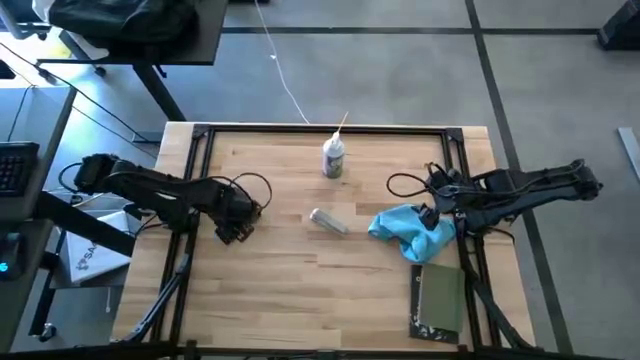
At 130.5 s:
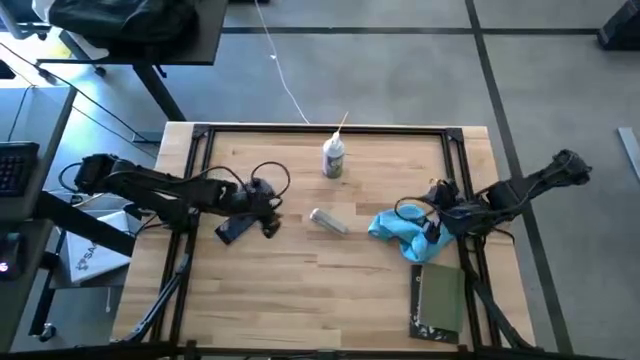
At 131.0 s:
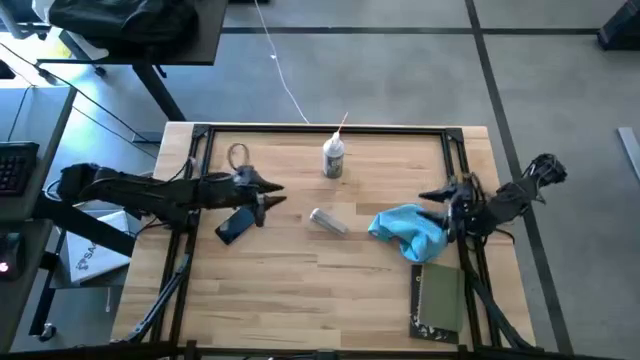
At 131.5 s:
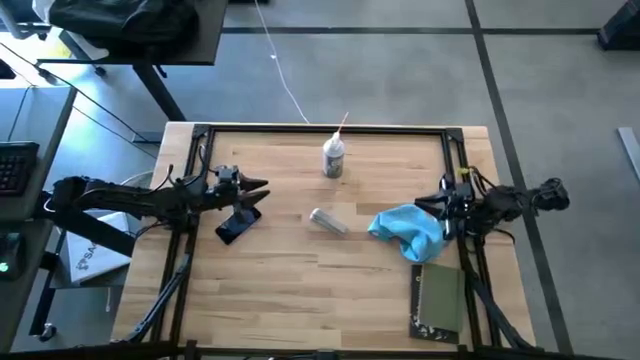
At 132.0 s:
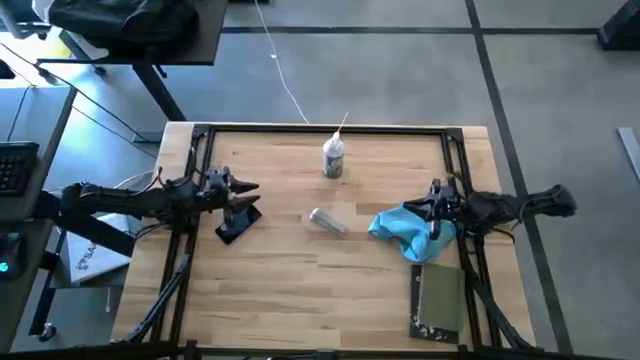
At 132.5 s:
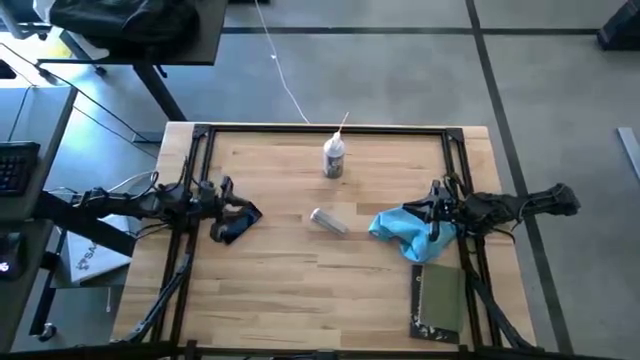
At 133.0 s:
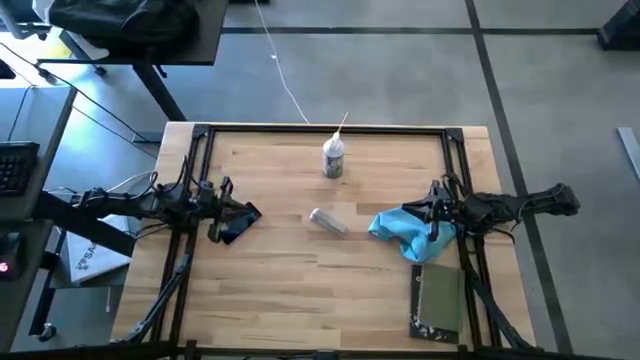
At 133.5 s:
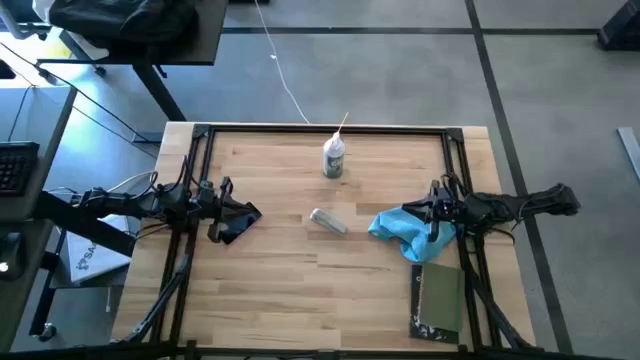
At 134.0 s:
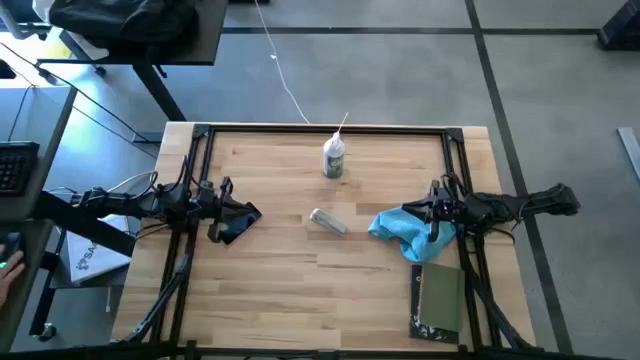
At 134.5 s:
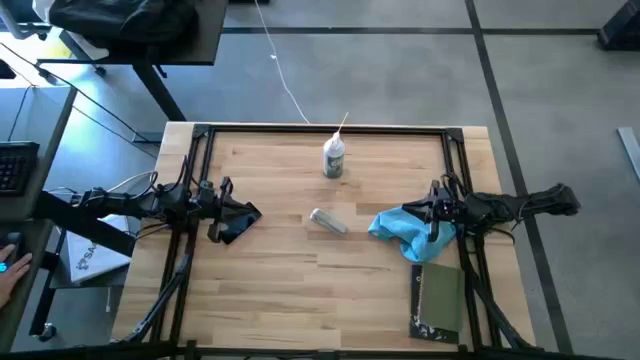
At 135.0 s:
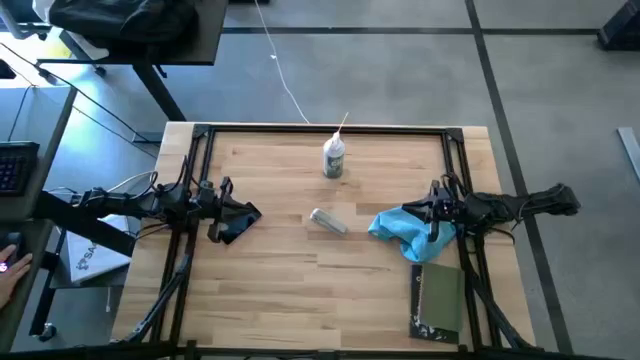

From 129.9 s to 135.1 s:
Task: Apply microfiber cloth
Return to Home Position

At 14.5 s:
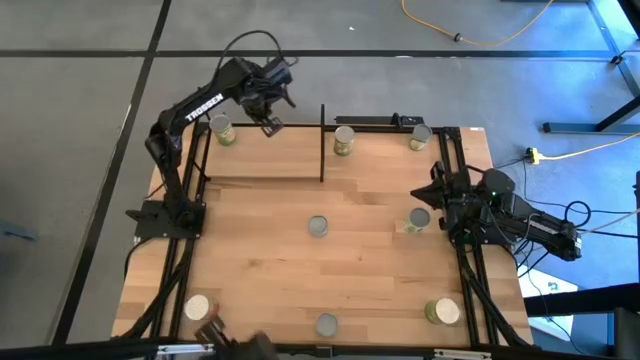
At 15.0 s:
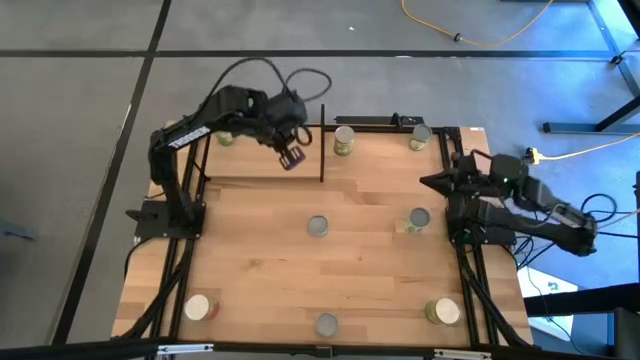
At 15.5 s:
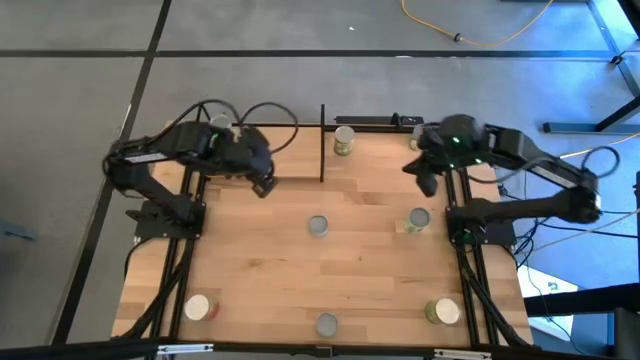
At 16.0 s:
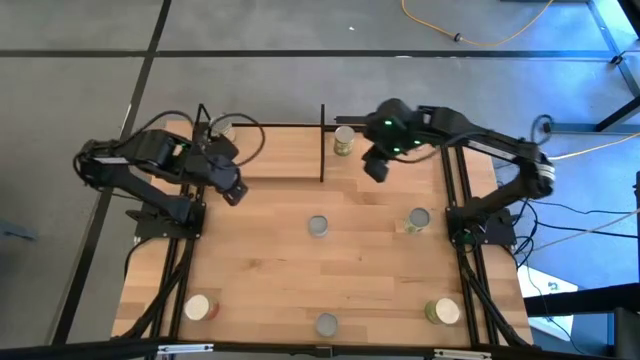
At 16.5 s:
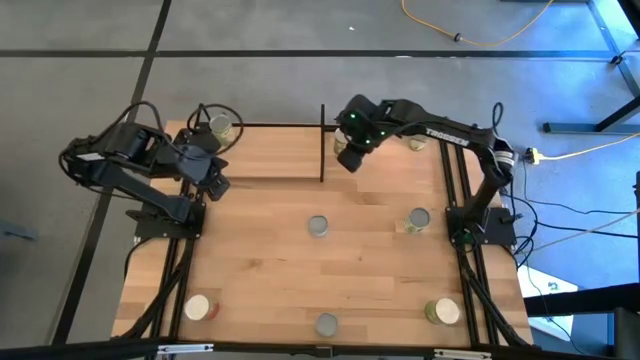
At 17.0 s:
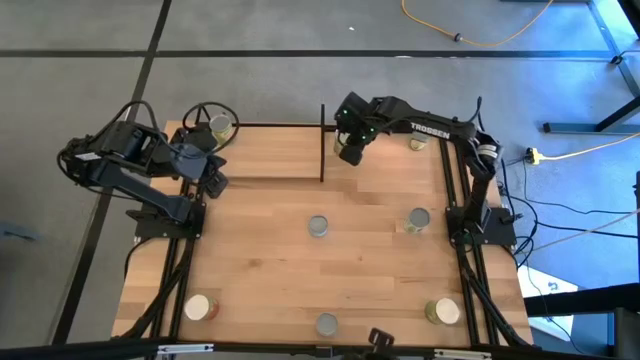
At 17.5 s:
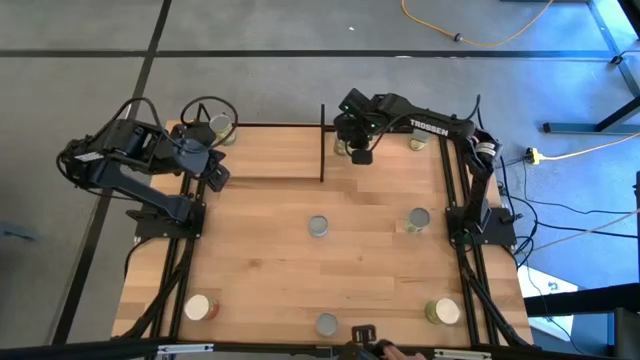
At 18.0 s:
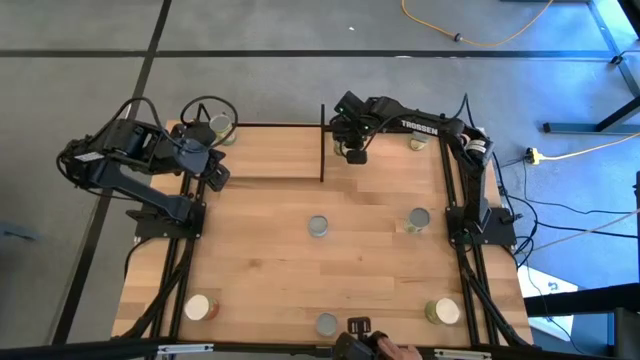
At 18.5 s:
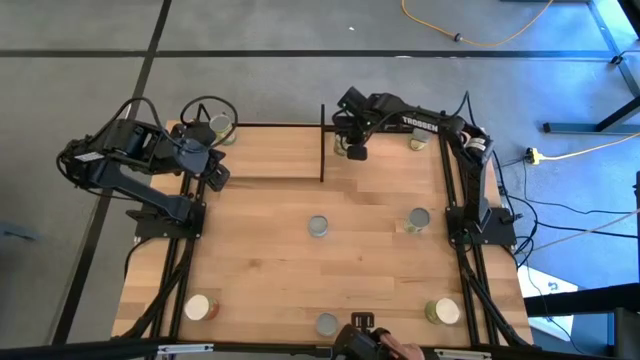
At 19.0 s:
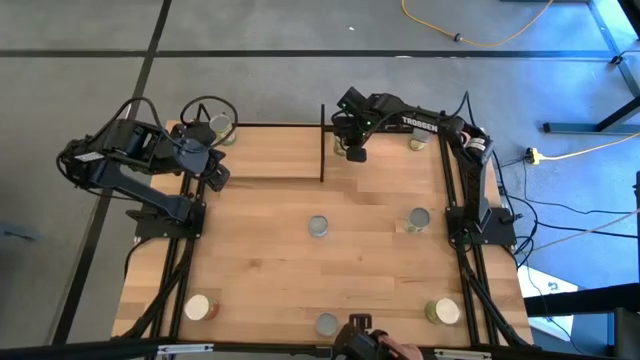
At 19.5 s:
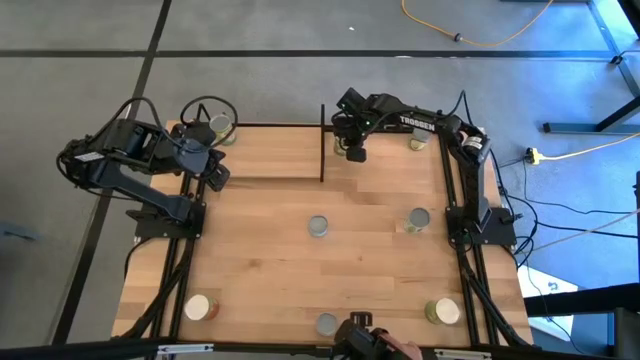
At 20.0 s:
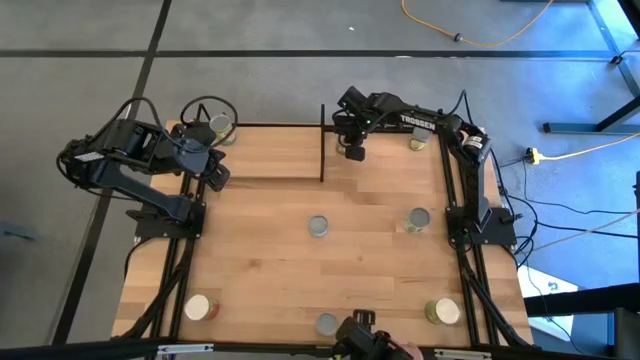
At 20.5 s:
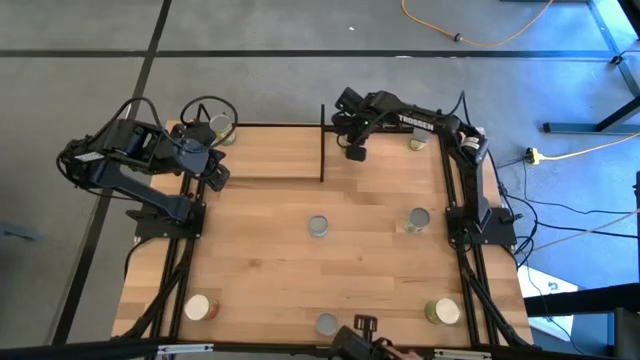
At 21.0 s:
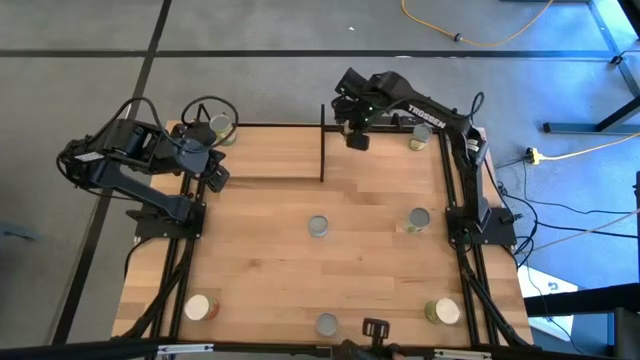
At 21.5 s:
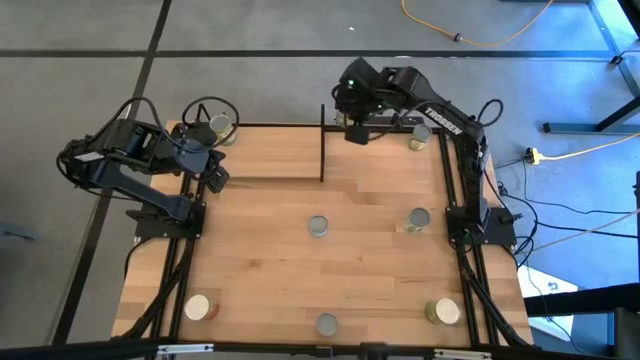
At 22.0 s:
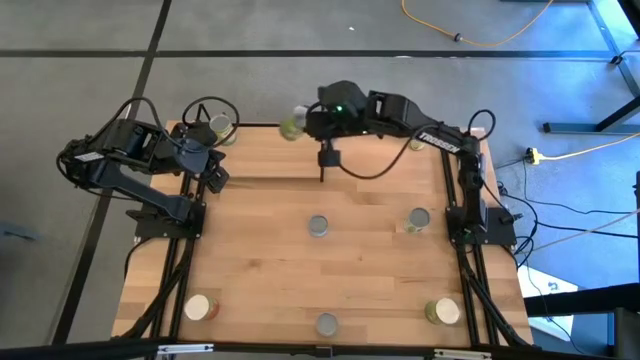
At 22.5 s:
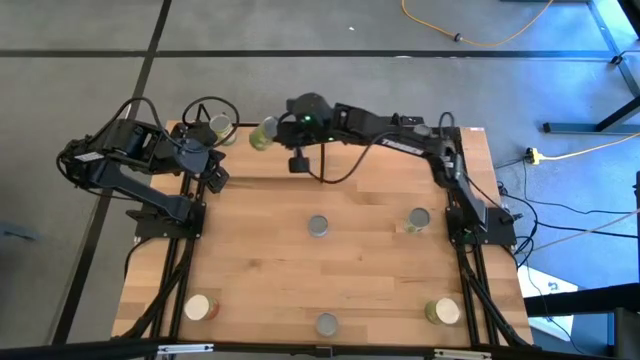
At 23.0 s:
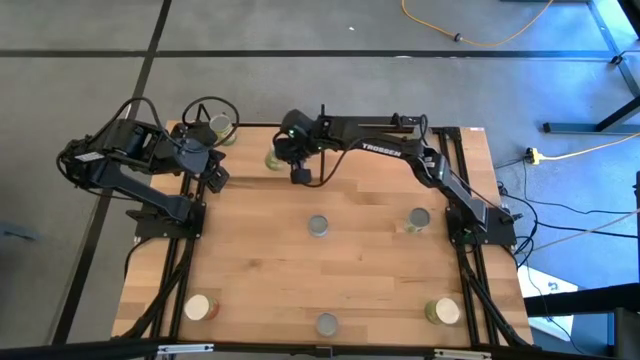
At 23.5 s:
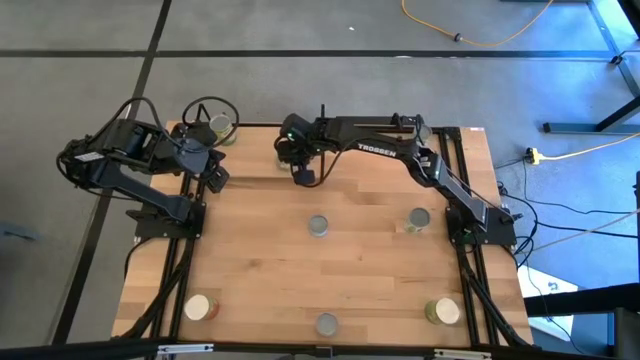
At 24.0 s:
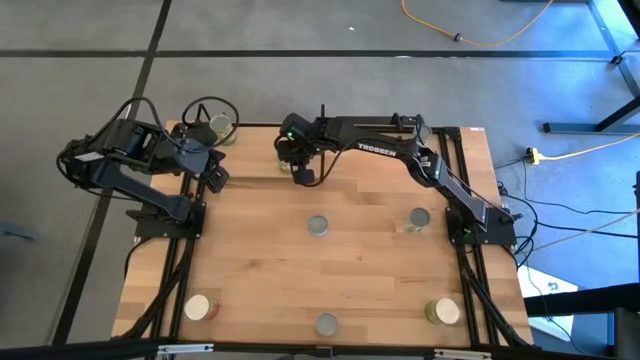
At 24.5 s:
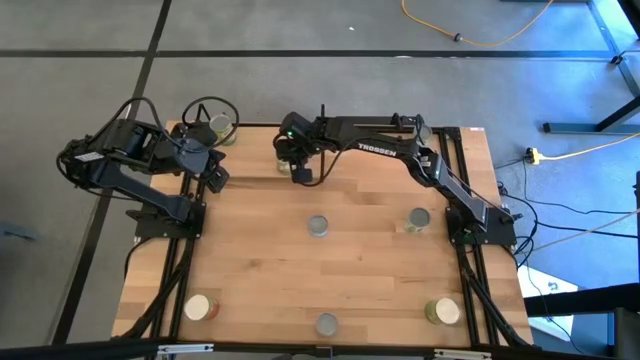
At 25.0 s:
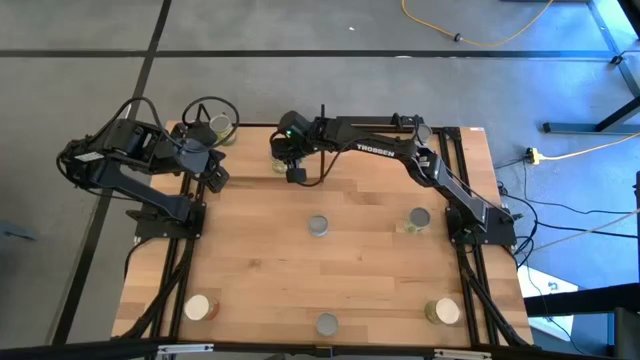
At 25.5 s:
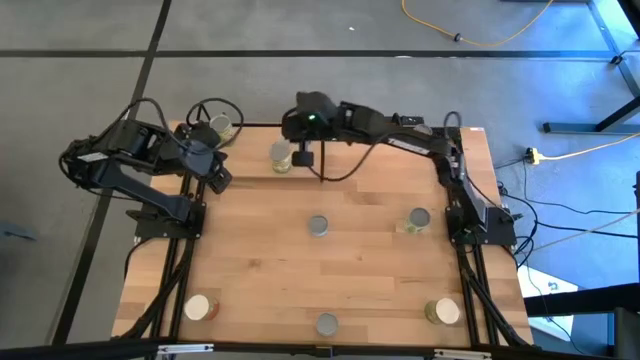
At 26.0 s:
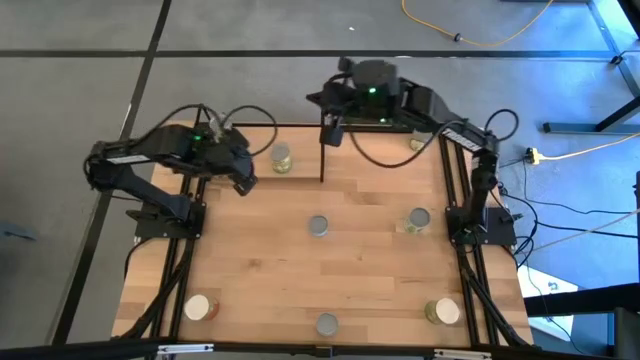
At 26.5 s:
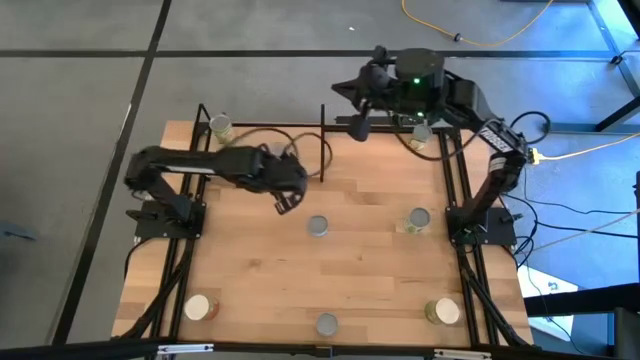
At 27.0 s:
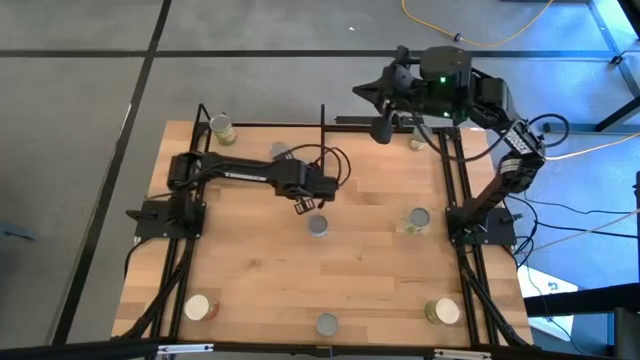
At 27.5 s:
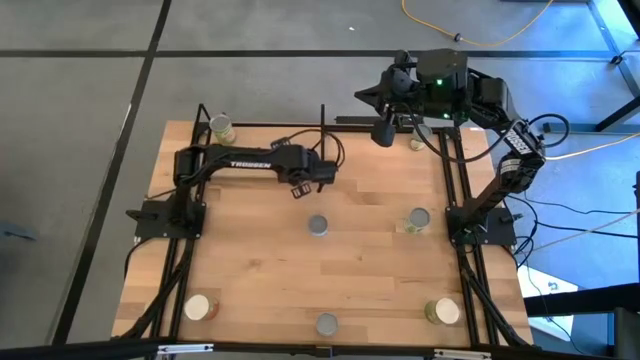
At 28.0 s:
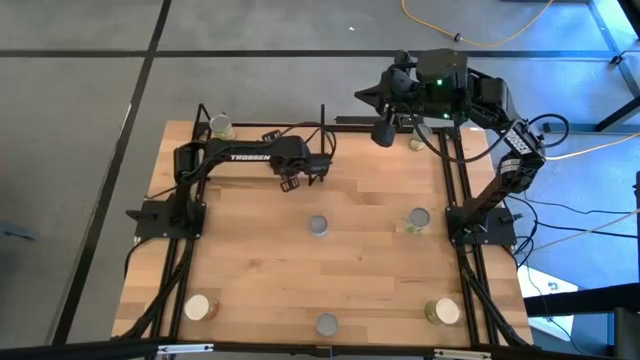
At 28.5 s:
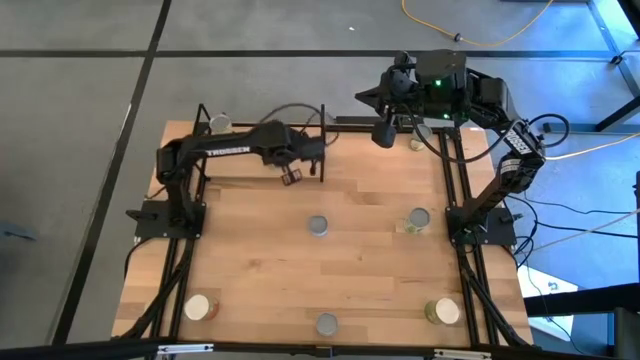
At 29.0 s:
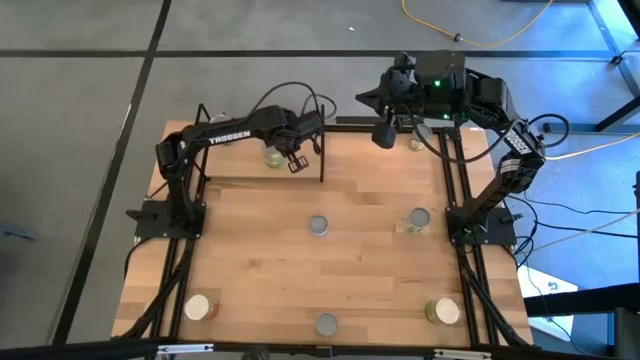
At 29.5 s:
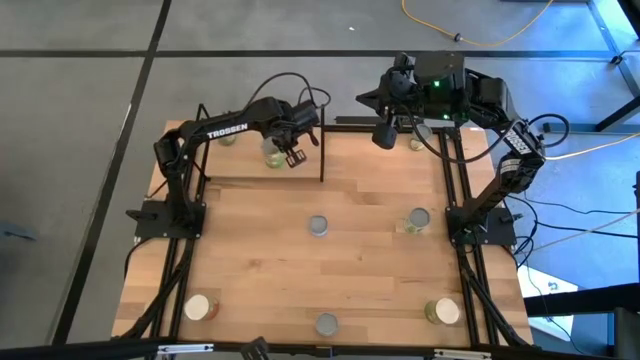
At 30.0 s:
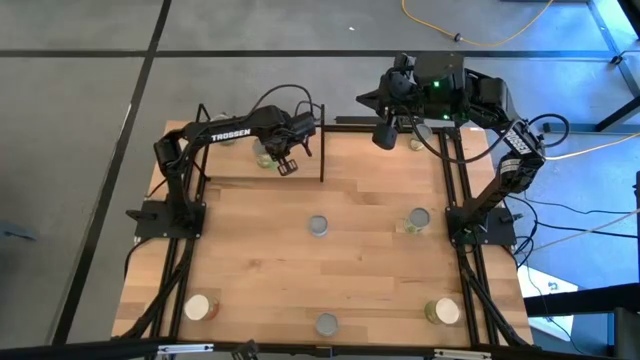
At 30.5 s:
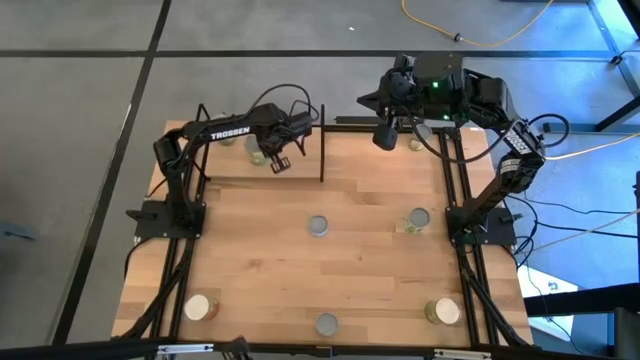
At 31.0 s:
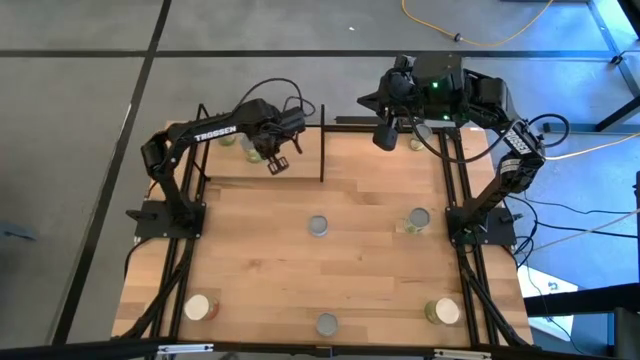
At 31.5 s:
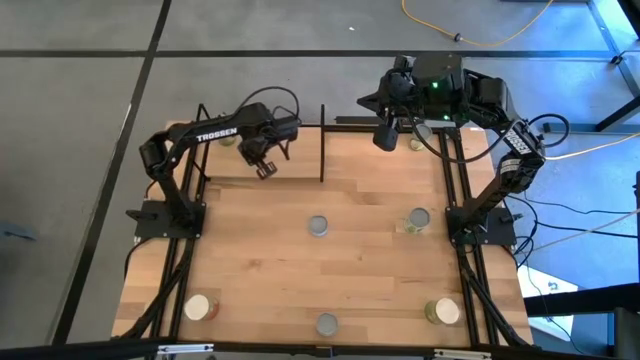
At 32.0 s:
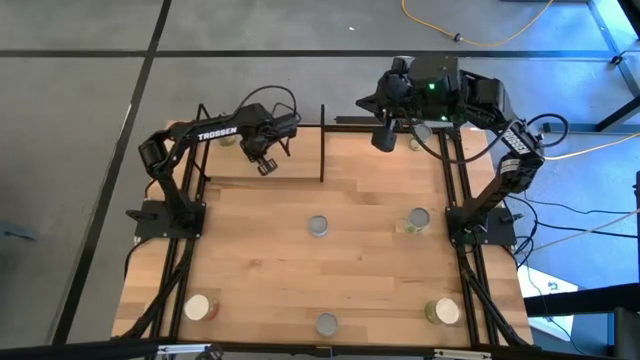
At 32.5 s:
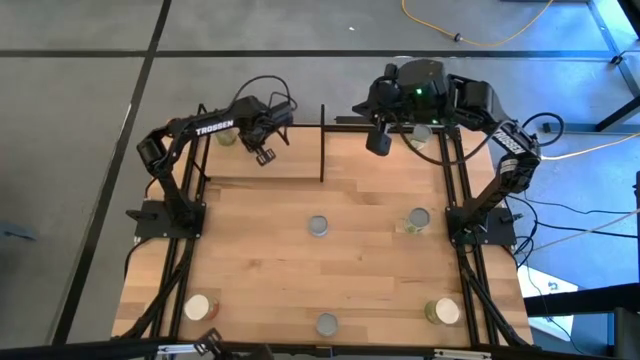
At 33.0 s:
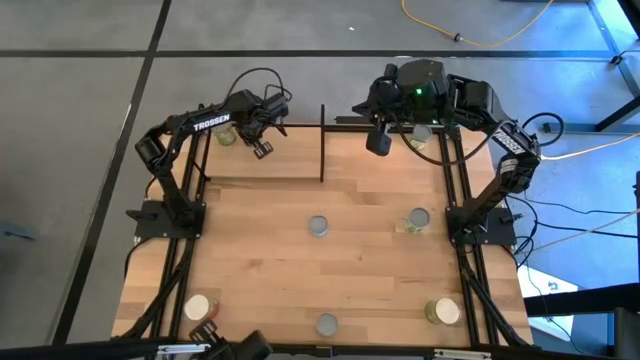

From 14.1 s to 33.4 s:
Task: Pick and place cans onto a shelf
Put the canned pears can on the shelf
